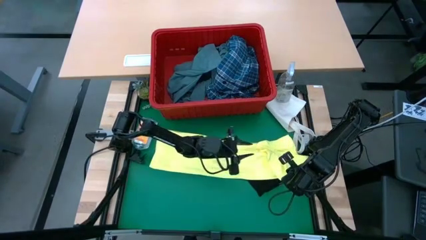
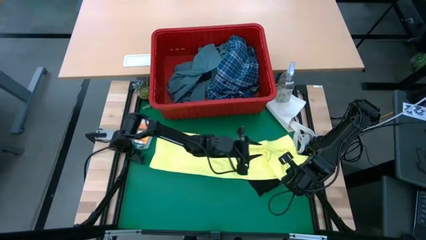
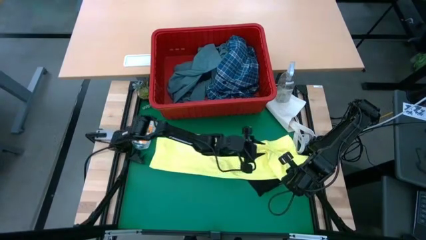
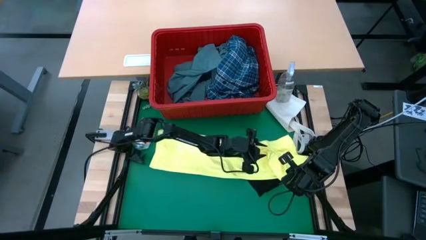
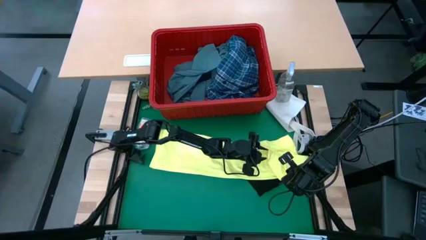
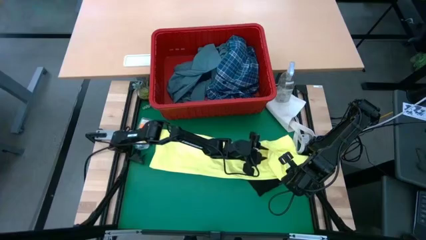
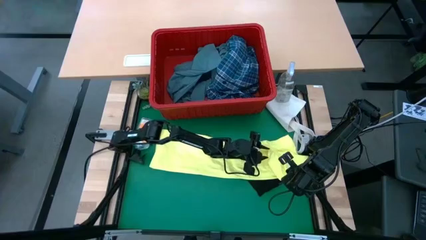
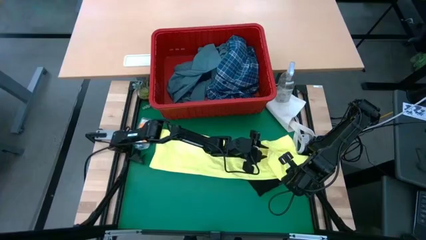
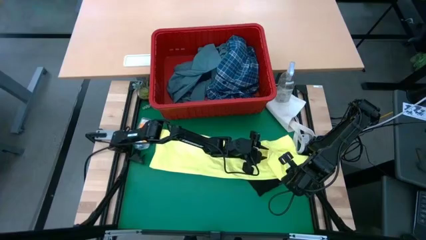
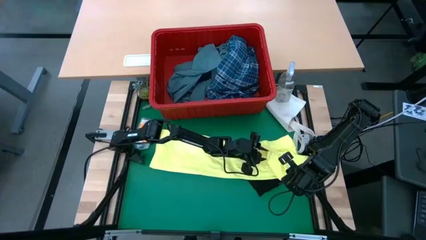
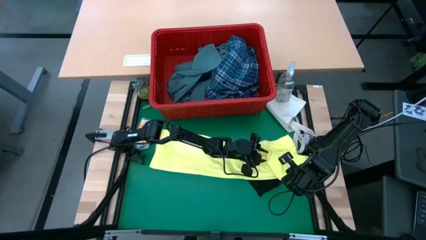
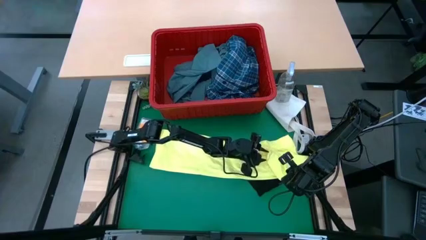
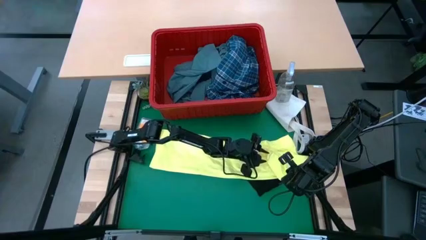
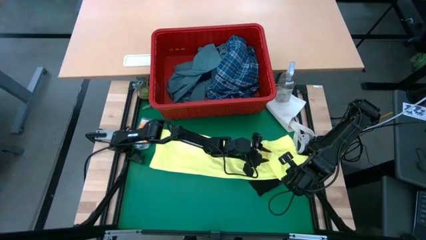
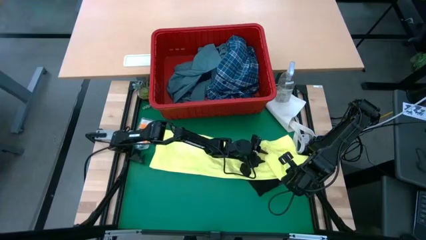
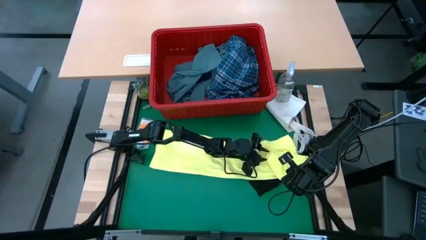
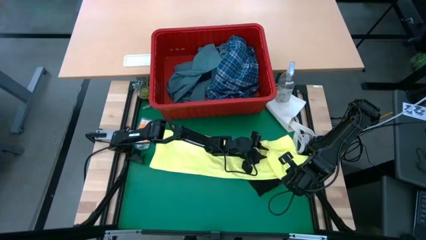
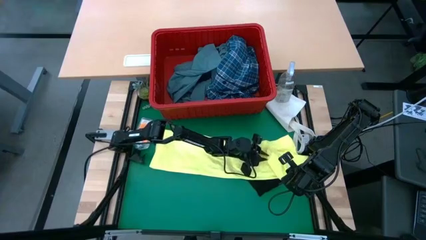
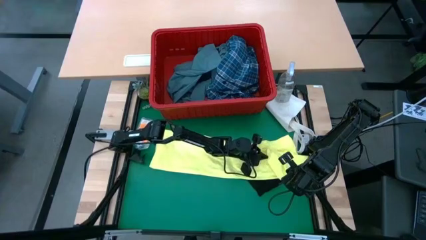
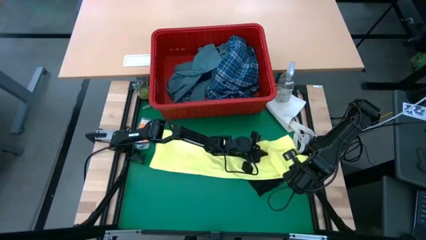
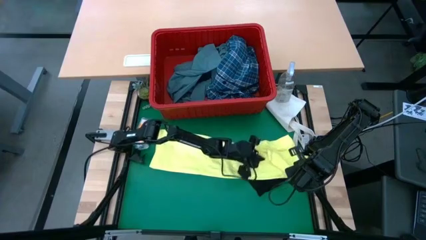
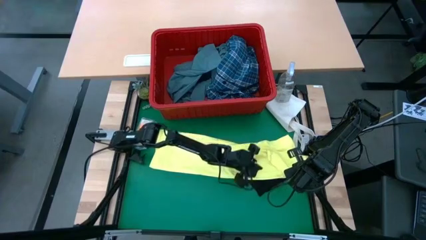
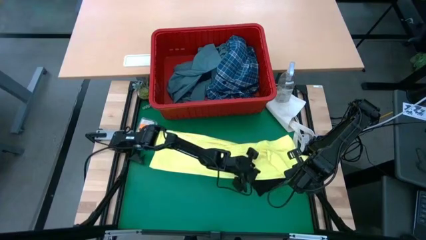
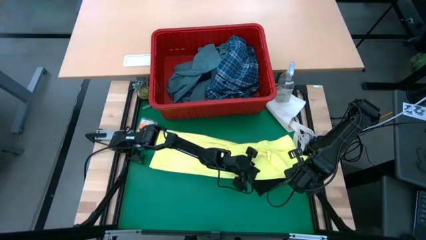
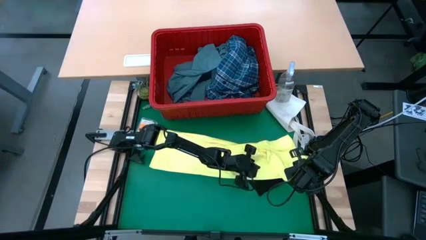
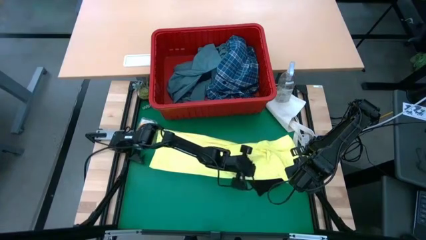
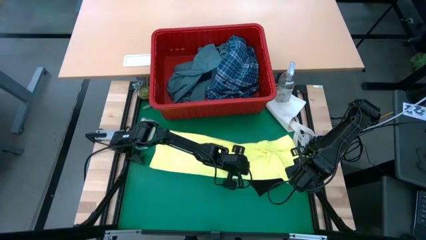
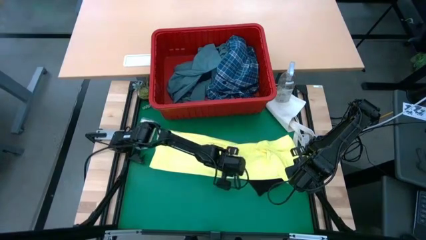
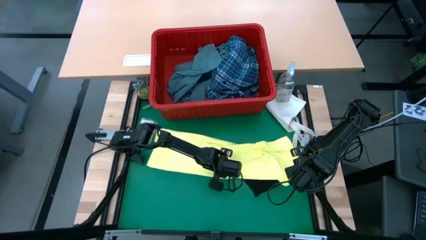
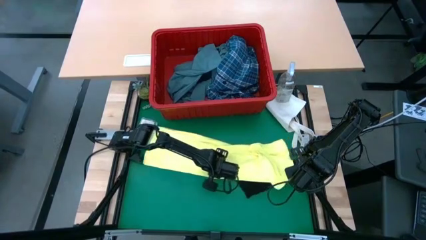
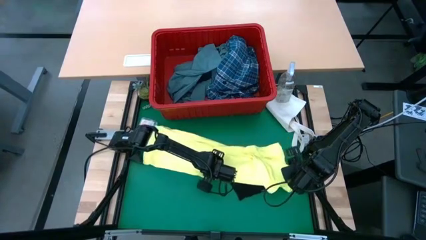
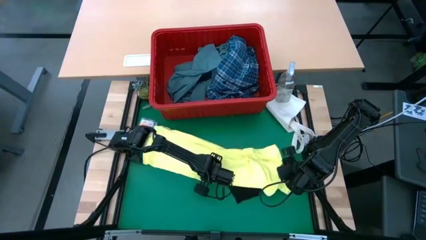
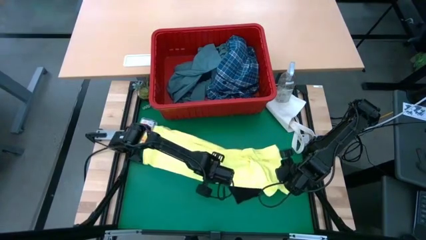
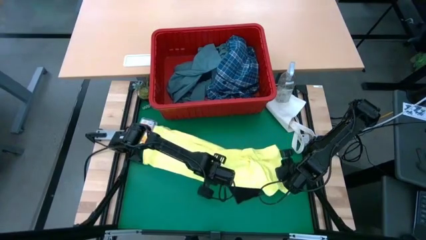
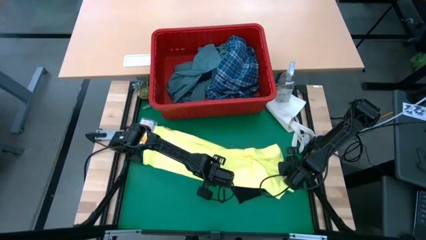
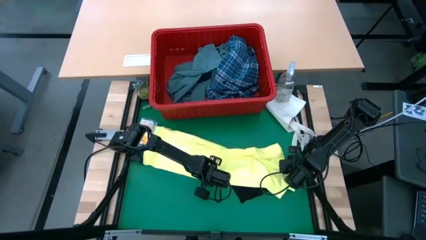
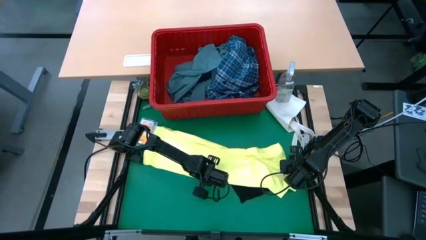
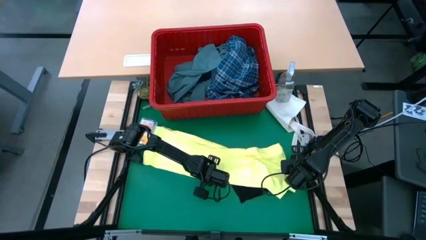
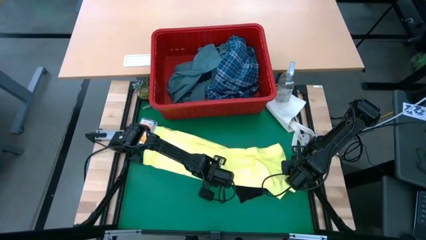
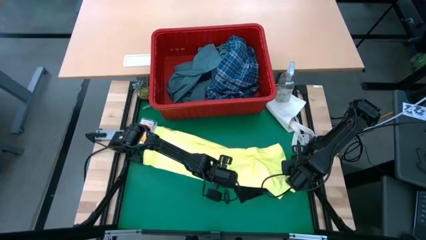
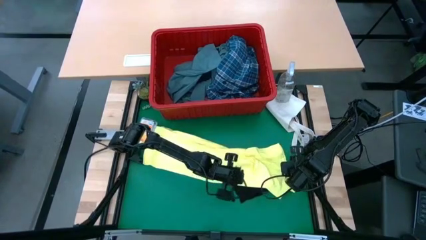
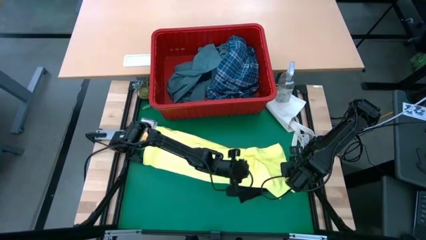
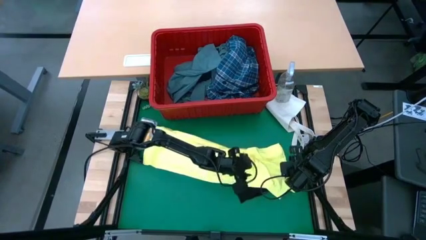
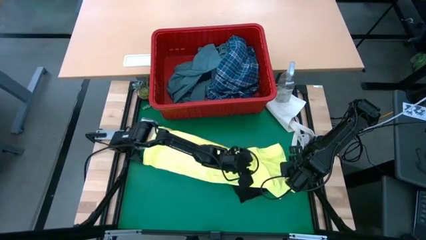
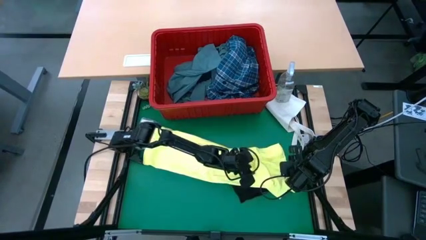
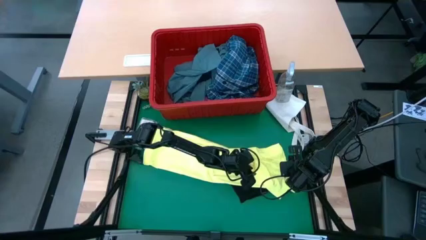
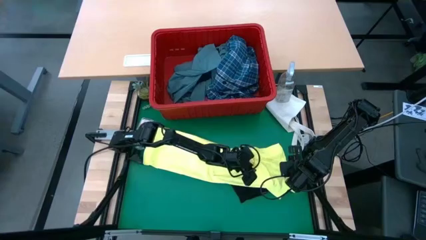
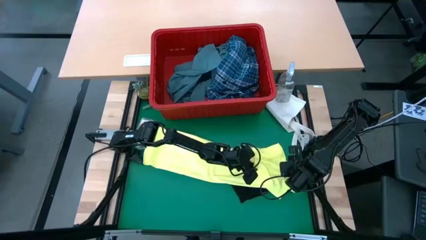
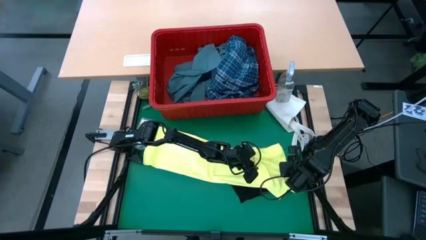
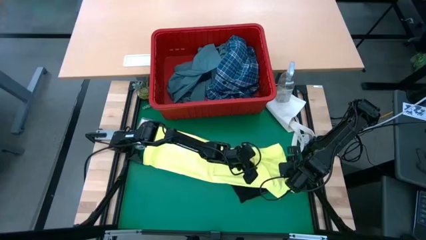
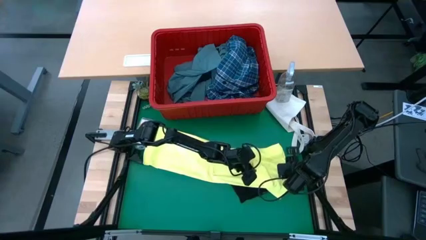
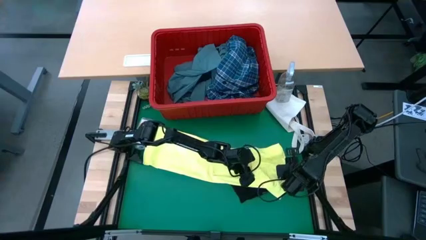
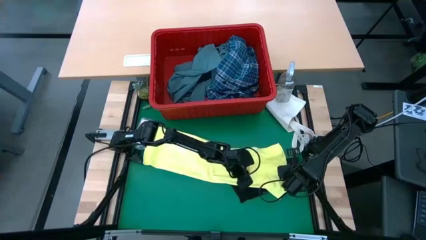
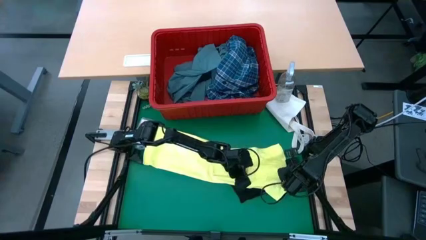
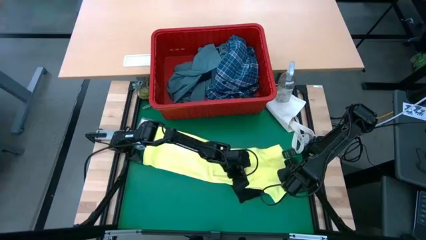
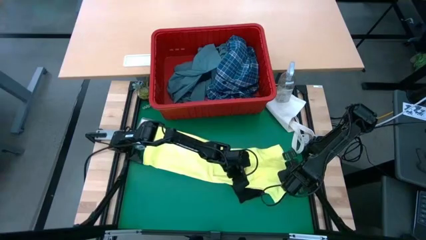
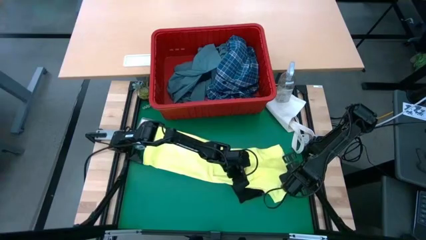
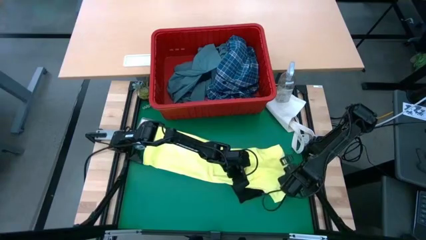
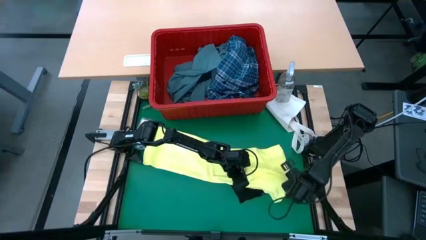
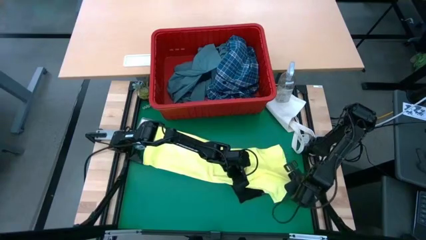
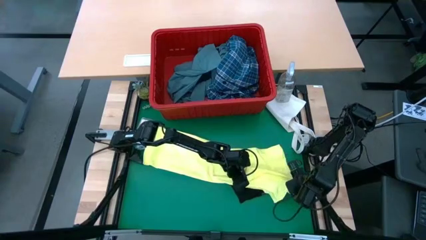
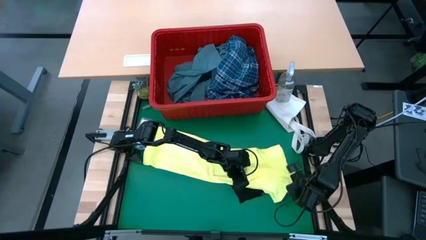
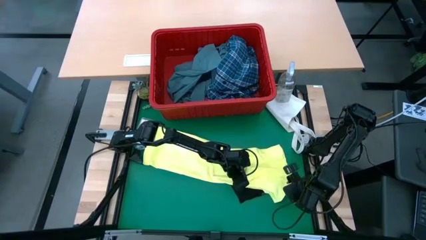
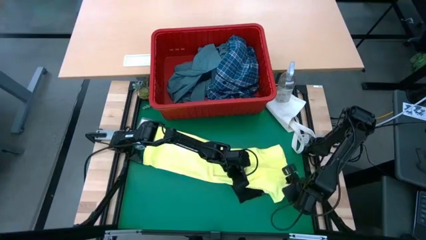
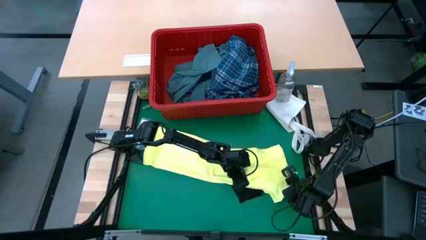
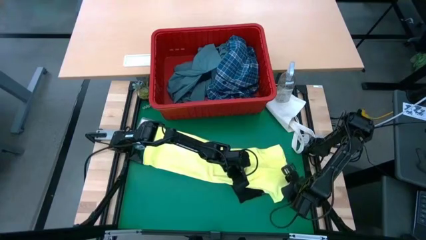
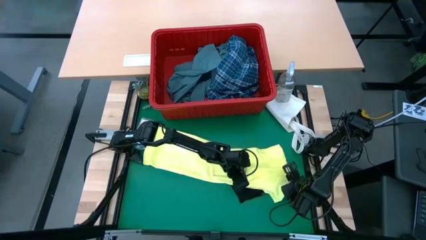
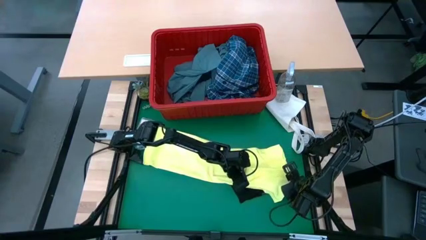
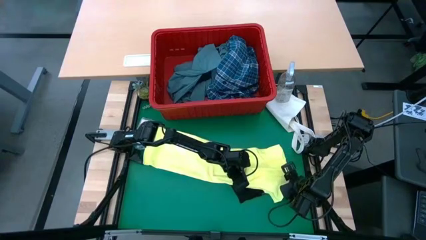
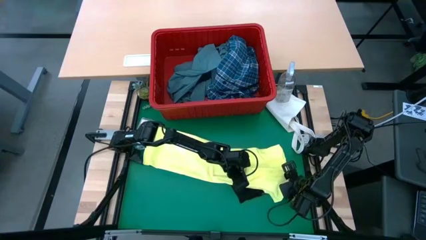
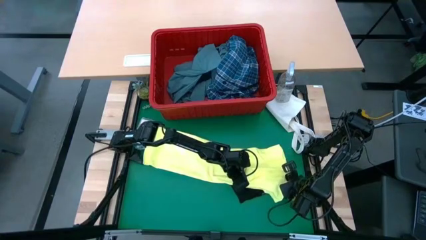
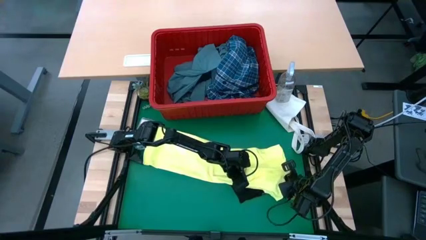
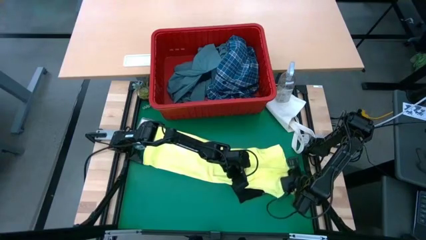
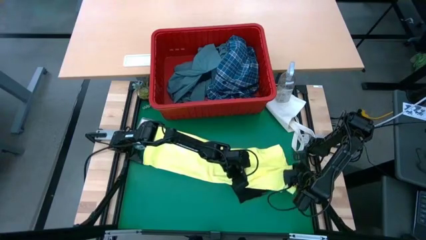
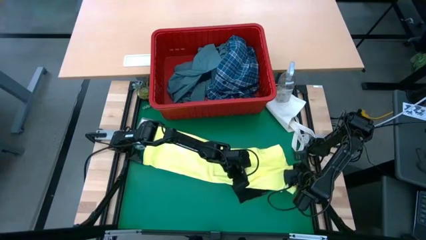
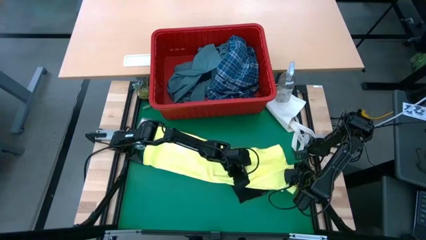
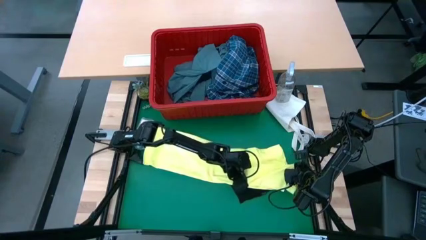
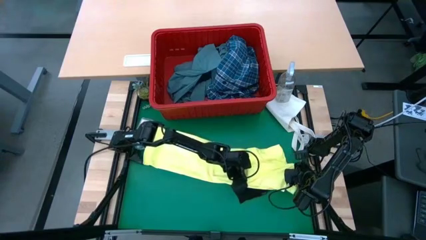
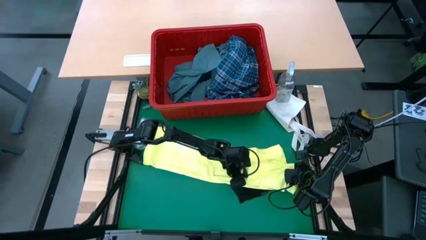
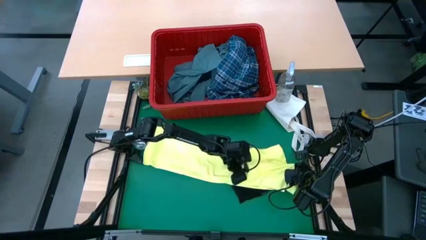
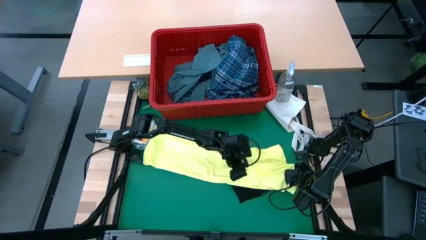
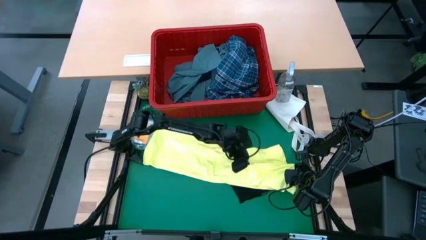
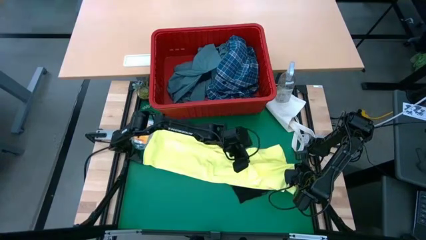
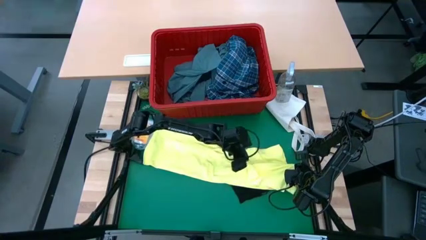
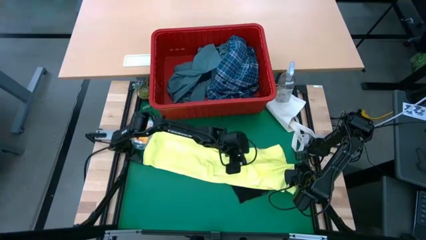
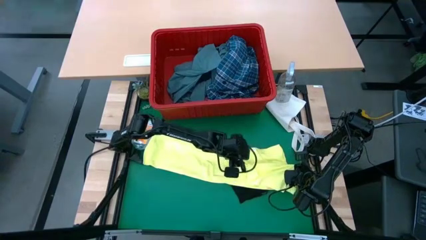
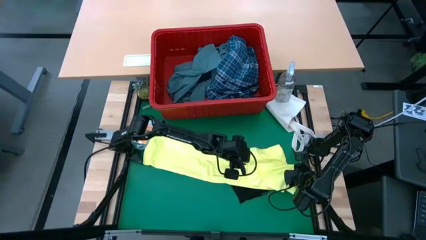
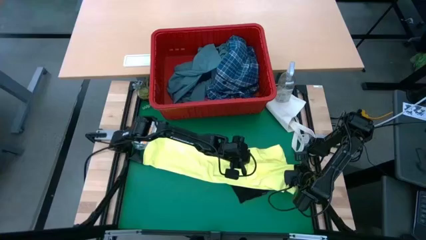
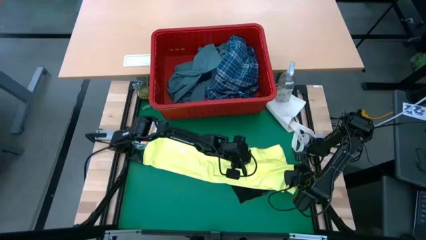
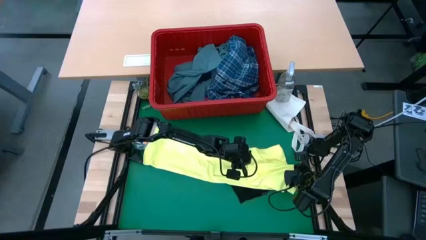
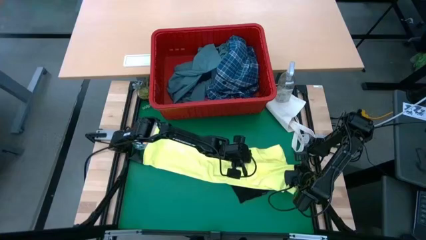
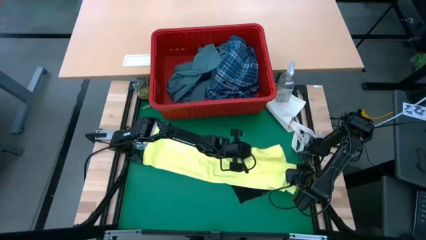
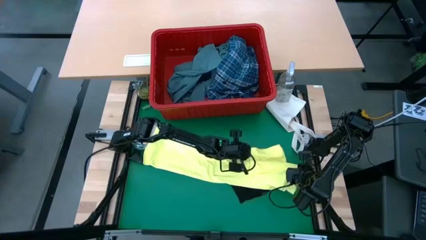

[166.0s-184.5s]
Task: Fold Laundry from Bin
Fold the yellow shirt
